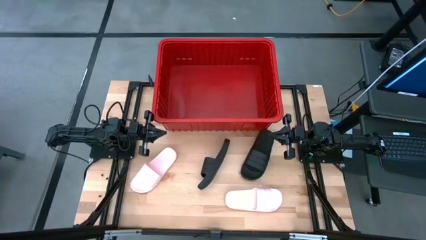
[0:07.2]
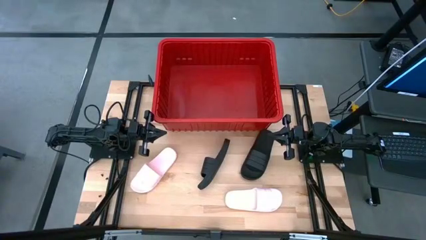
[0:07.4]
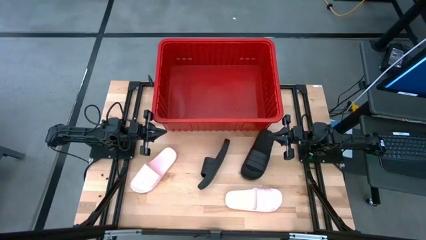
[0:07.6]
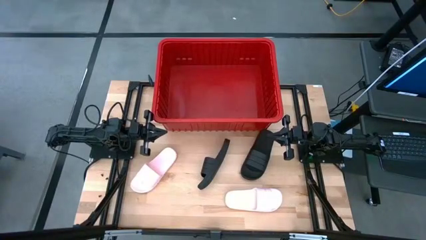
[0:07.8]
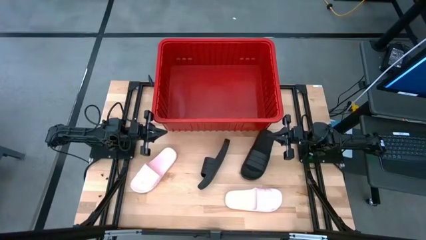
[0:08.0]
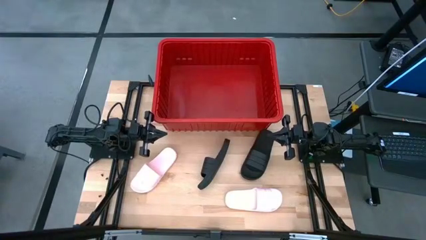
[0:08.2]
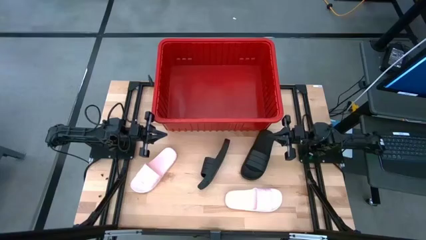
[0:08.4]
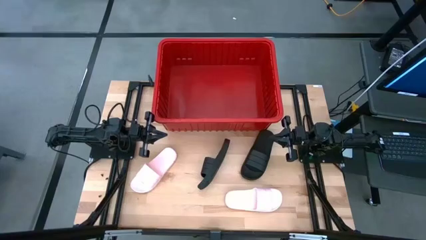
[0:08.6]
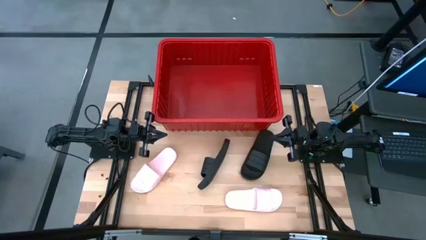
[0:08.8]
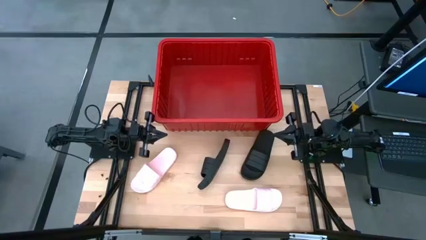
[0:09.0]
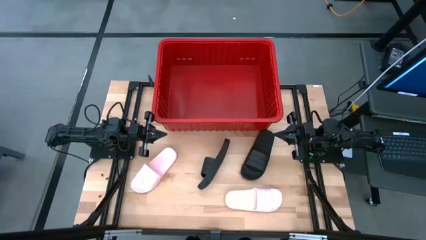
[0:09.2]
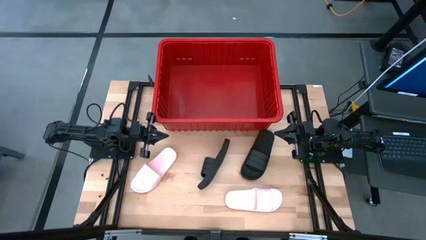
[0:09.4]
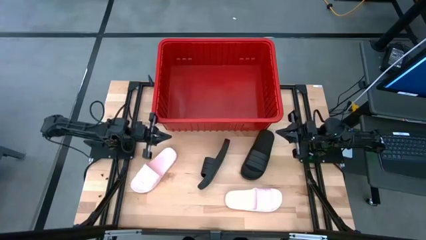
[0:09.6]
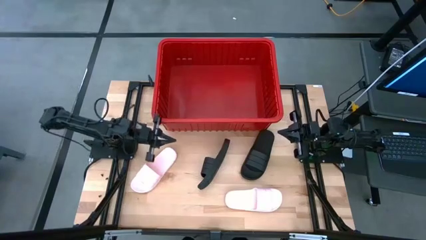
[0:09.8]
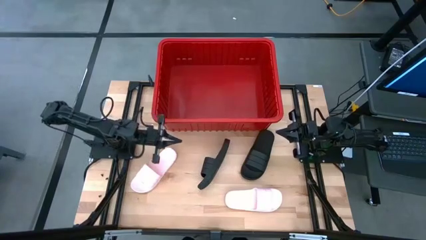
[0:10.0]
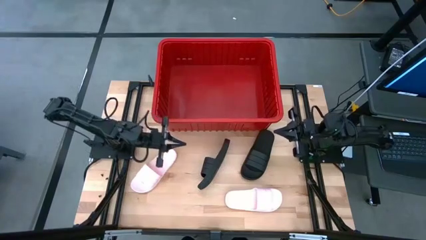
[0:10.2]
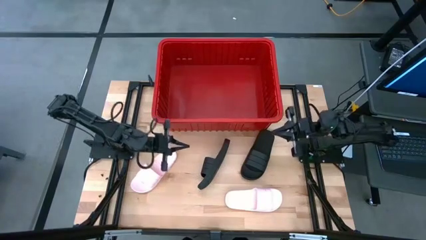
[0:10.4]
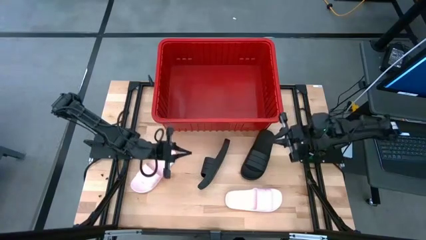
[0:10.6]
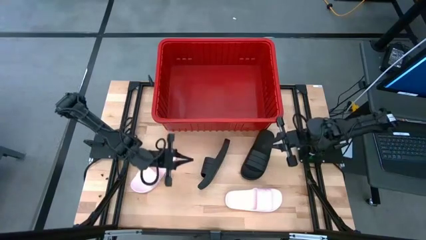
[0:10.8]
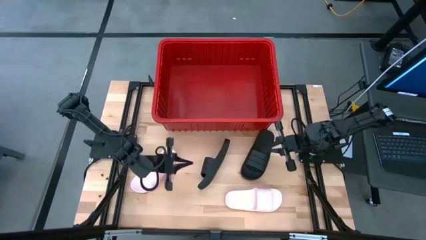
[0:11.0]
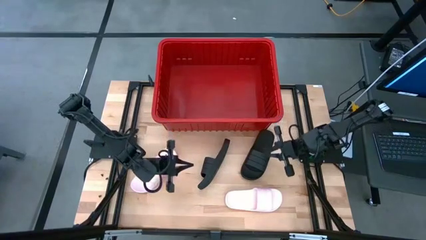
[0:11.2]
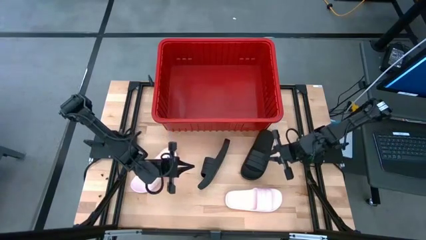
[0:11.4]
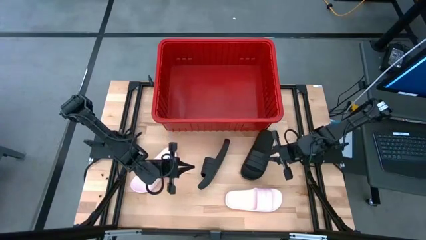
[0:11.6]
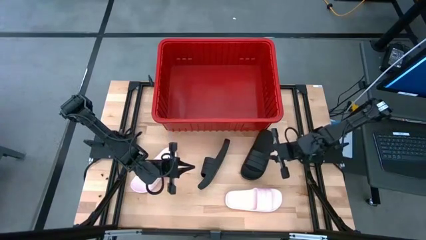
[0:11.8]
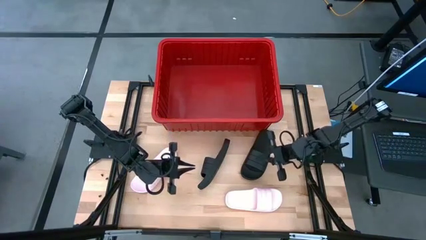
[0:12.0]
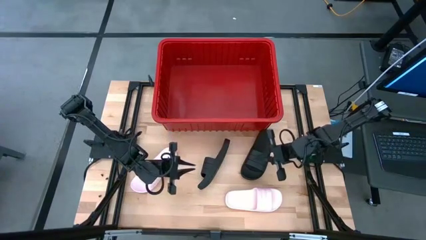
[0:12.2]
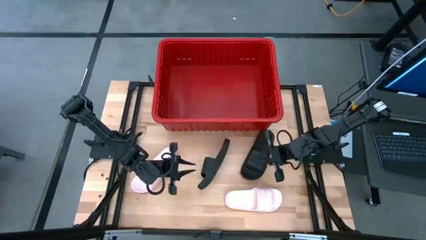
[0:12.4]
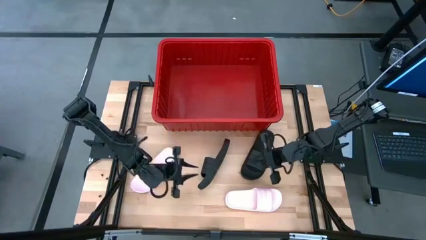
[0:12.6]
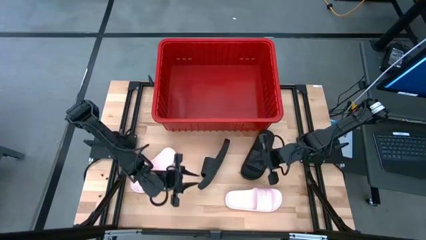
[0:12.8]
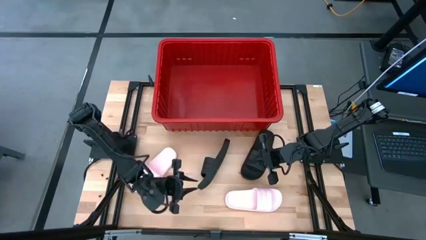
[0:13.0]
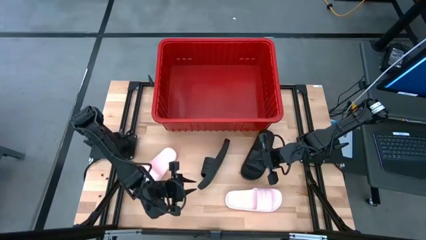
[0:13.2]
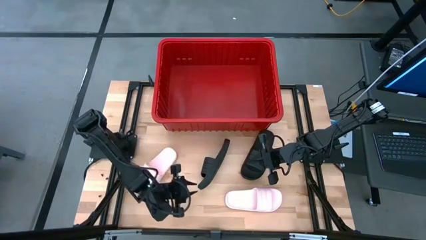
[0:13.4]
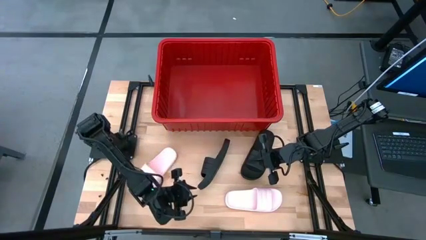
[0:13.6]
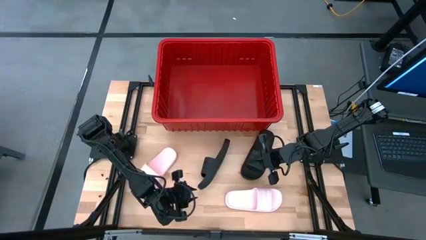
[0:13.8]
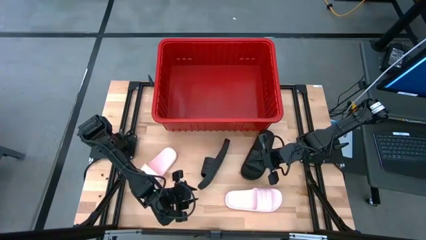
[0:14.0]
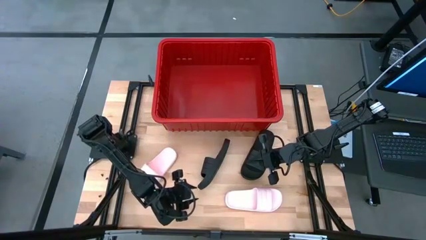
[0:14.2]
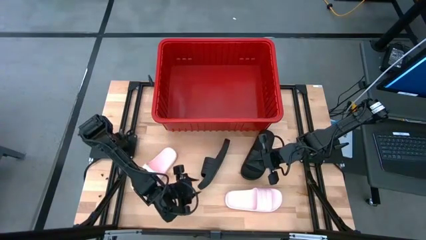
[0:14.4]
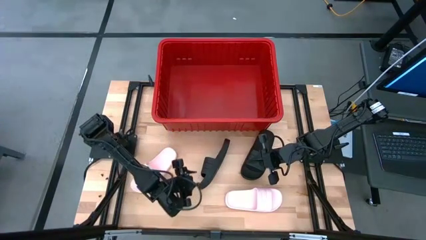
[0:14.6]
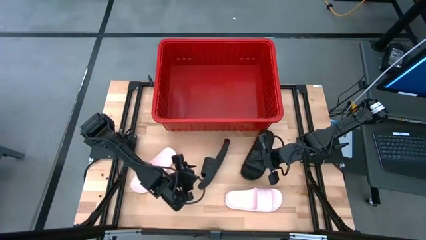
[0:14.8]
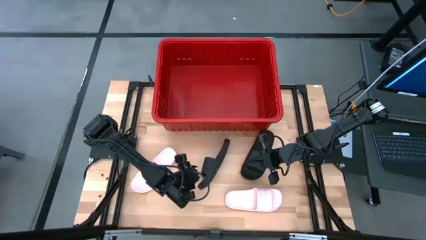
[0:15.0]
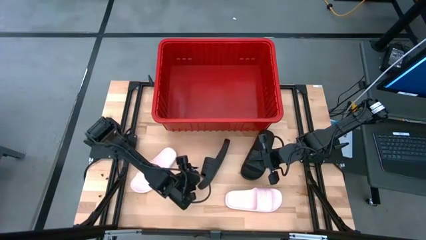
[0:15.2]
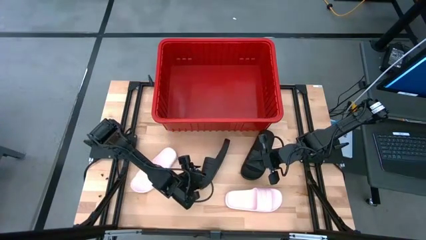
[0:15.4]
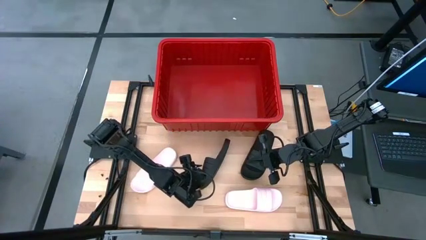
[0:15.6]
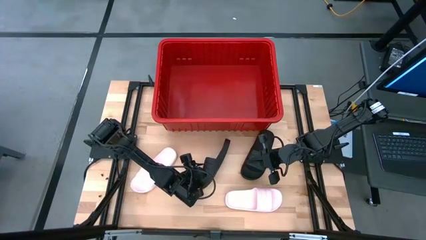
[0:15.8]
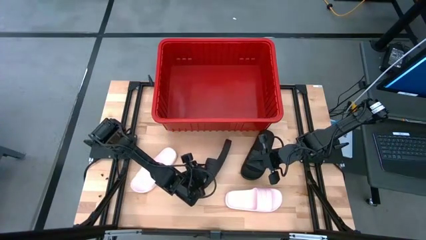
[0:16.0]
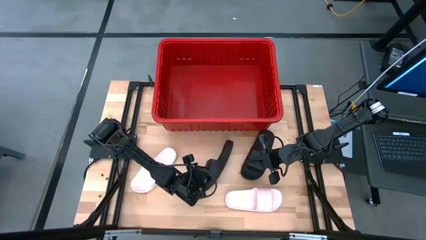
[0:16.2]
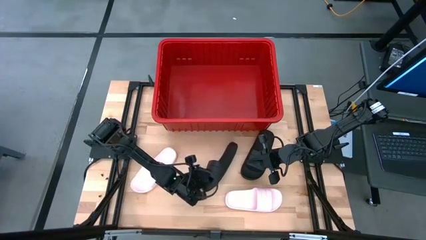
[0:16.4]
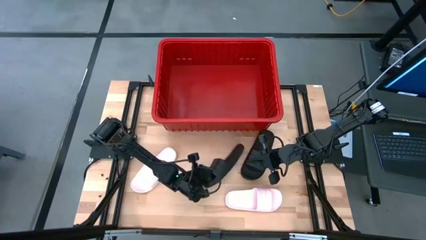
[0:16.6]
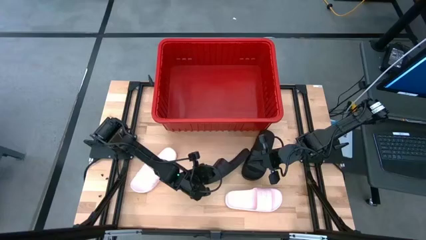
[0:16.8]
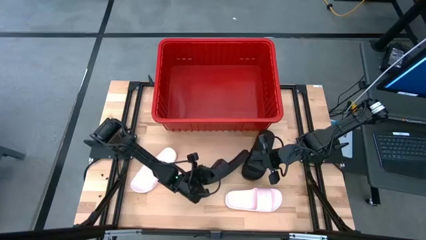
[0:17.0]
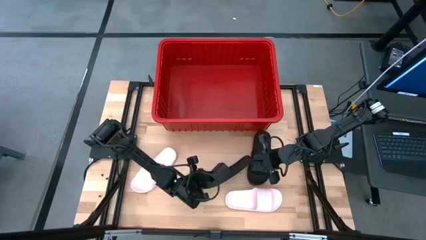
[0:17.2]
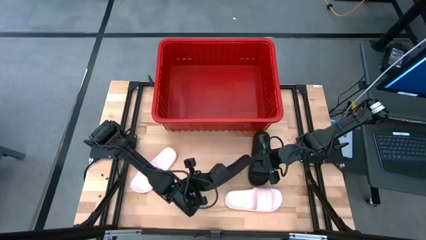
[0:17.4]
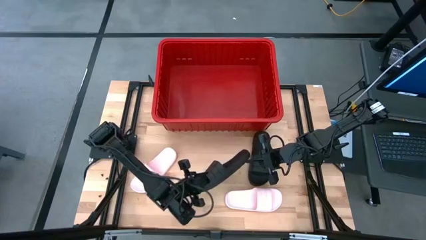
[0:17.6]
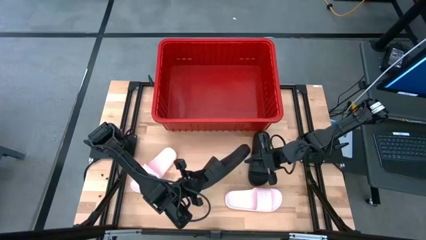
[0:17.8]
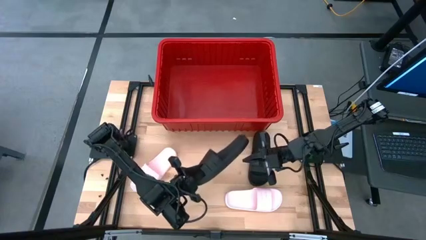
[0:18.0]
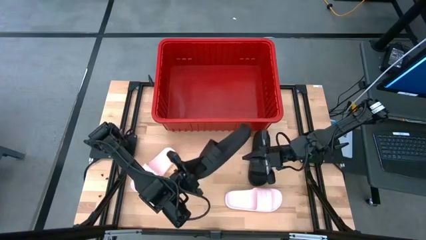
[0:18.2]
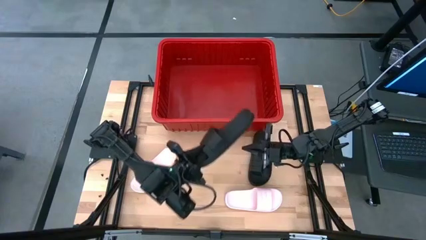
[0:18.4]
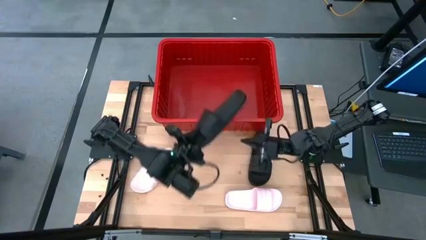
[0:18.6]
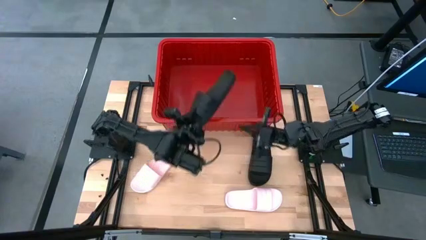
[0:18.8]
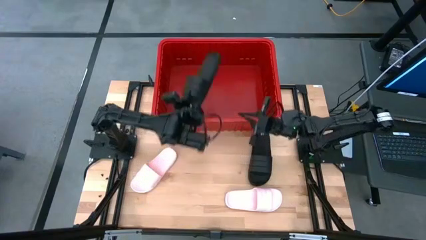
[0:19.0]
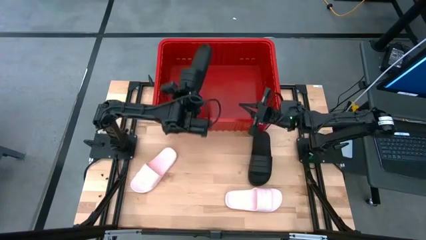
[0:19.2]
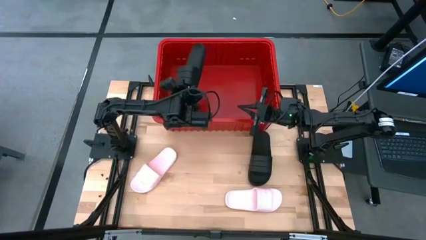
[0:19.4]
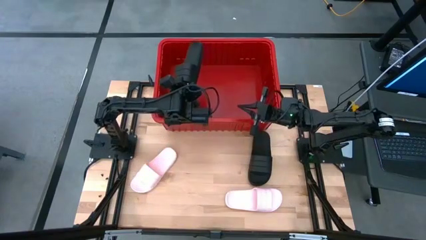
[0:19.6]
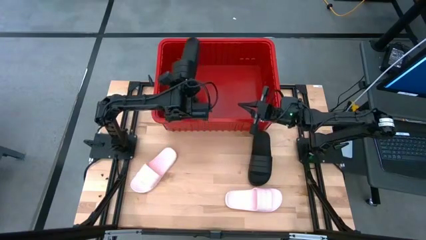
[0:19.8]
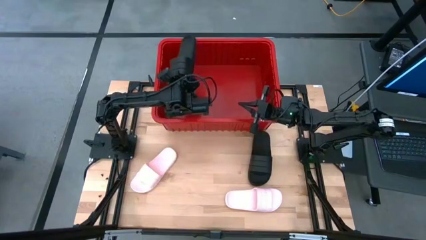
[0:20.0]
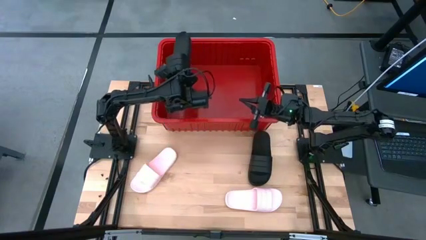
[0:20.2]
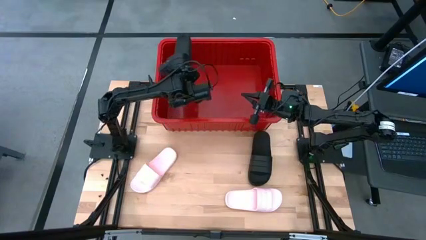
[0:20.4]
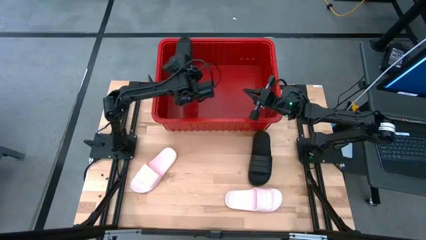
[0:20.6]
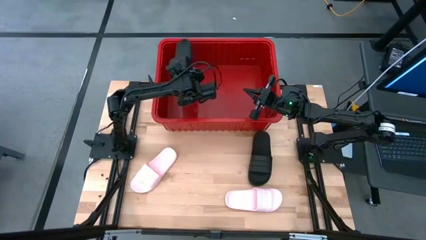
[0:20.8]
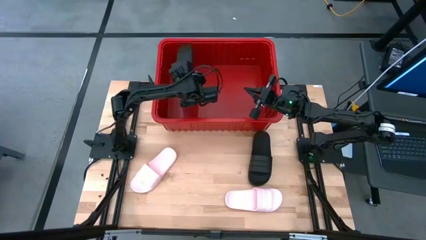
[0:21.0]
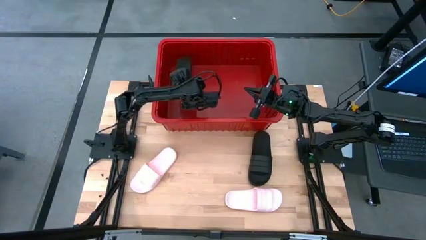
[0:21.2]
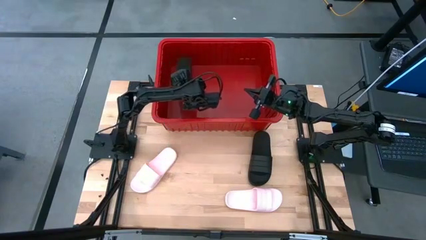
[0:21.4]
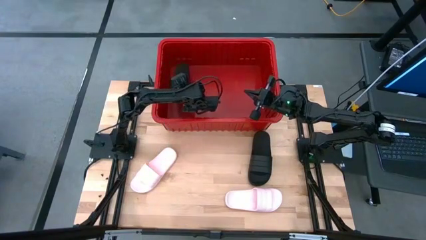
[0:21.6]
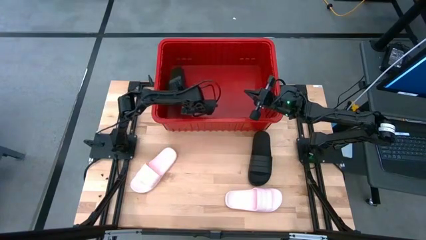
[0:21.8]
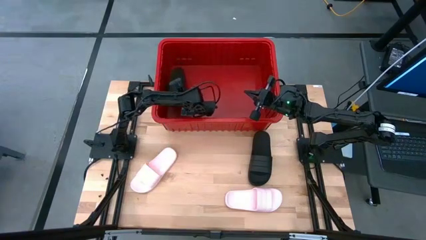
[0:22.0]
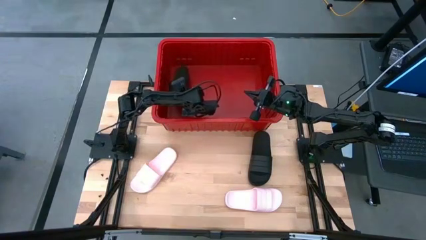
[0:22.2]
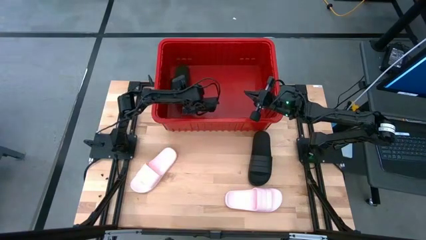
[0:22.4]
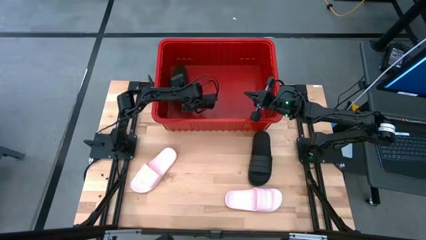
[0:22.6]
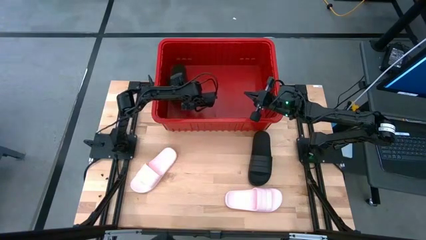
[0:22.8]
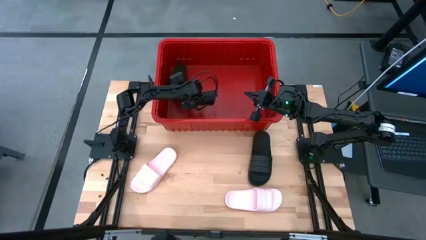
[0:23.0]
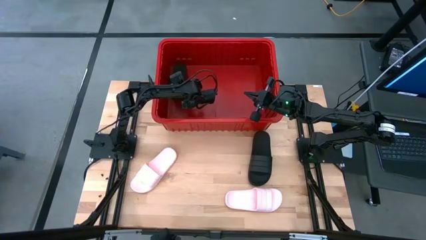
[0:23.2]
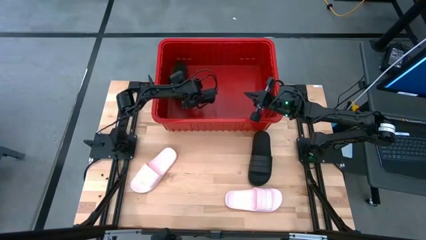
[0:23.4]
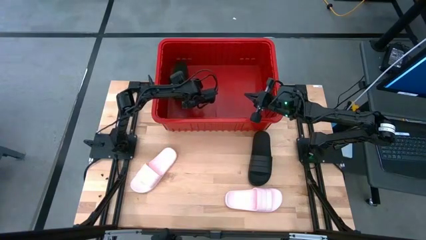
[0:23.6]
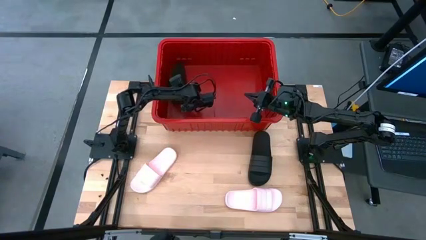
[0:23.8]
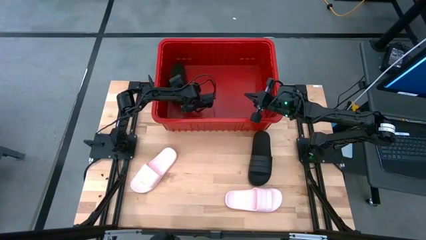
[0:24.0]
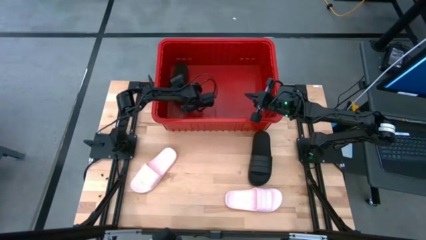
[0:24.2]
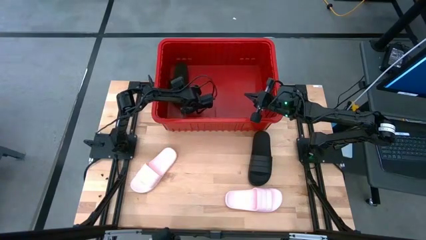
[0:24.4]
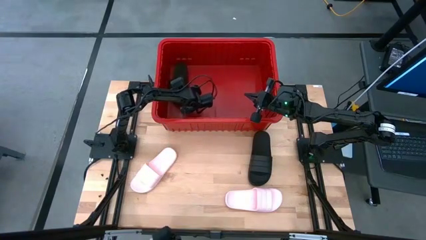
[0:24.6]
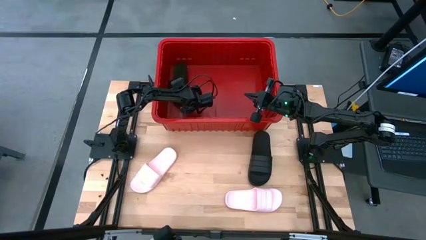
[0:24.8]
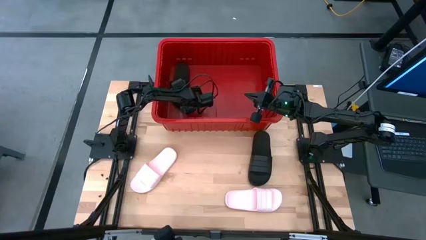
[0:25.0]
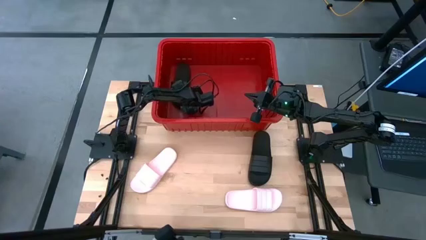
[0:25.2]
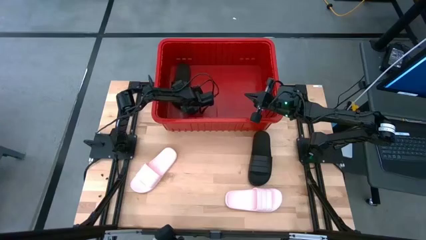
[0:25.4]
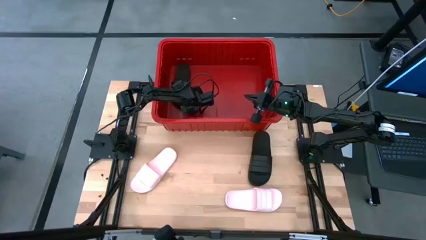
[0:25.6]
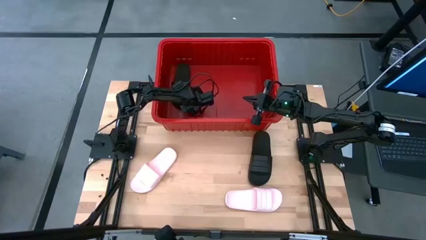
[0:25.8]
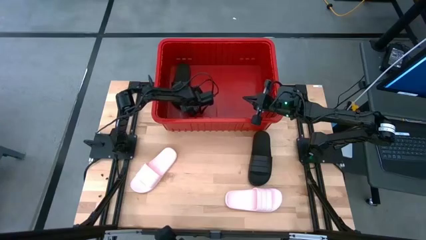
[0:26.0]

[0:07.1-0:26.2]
Task: Pick and place slides into bin
Put the left black slides into the red bin
